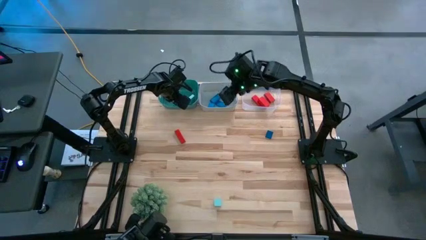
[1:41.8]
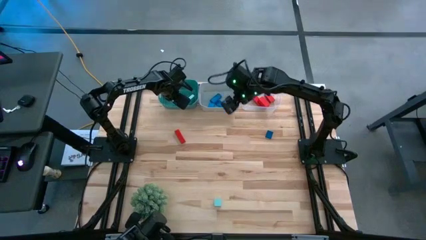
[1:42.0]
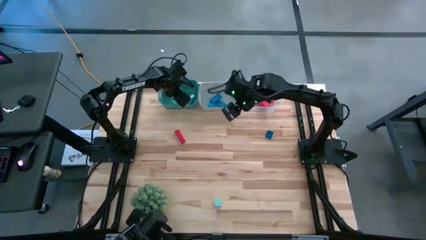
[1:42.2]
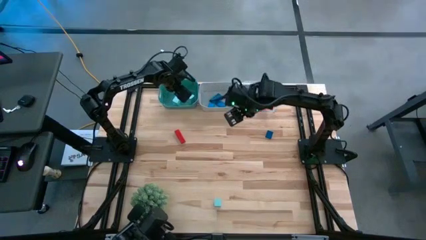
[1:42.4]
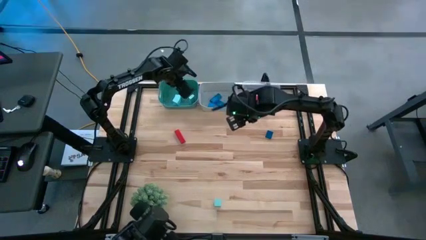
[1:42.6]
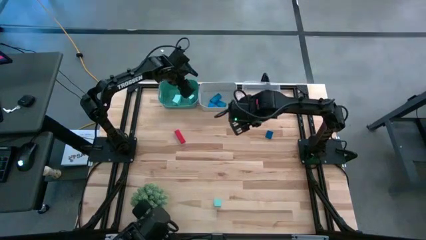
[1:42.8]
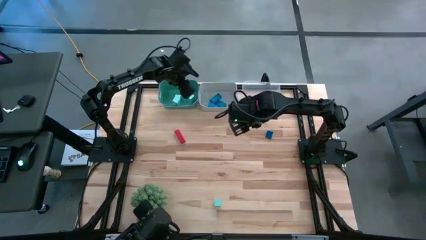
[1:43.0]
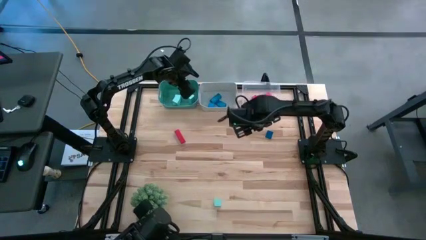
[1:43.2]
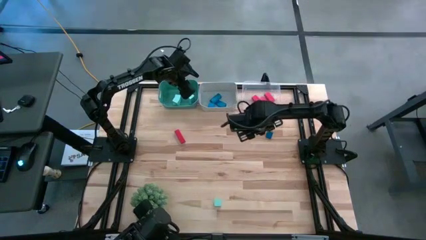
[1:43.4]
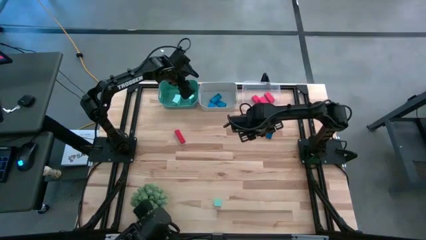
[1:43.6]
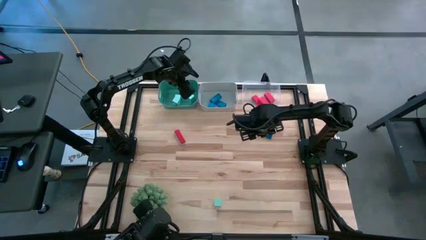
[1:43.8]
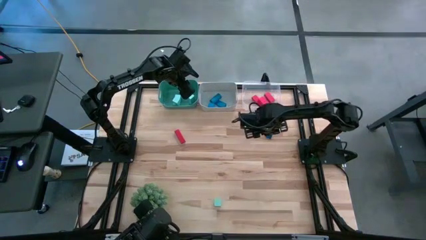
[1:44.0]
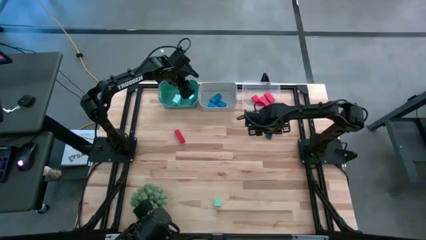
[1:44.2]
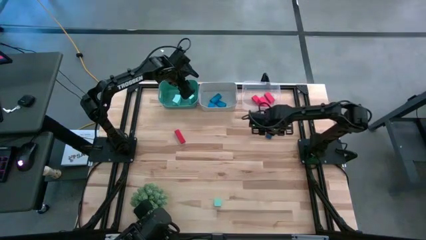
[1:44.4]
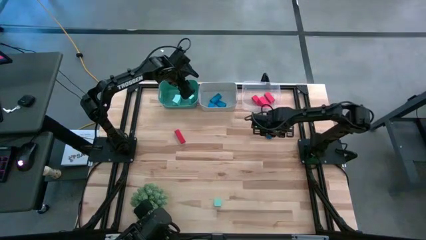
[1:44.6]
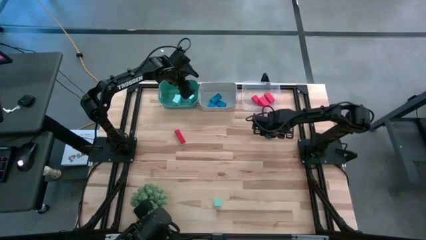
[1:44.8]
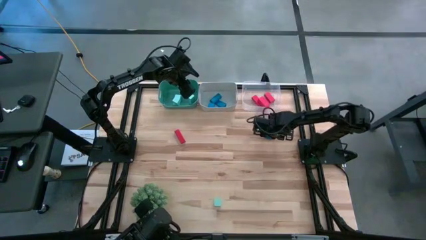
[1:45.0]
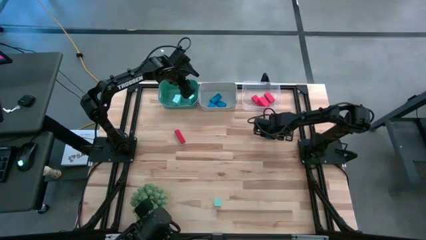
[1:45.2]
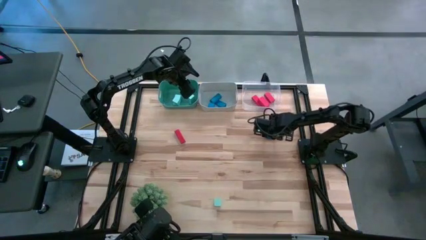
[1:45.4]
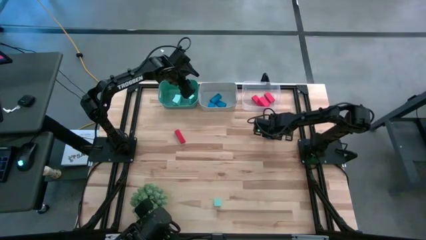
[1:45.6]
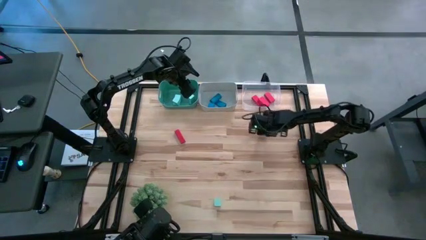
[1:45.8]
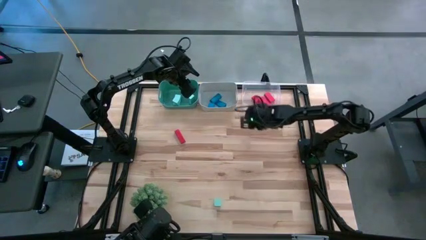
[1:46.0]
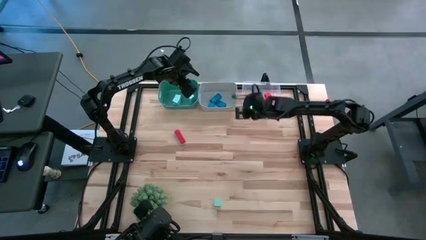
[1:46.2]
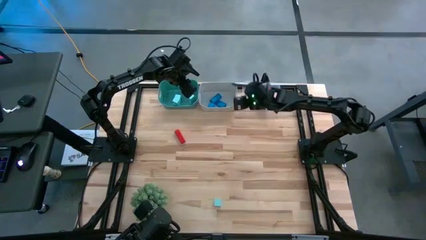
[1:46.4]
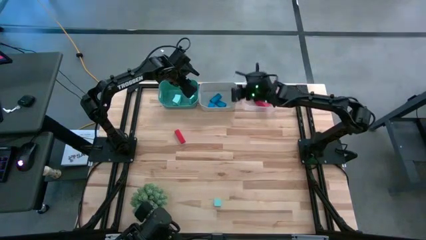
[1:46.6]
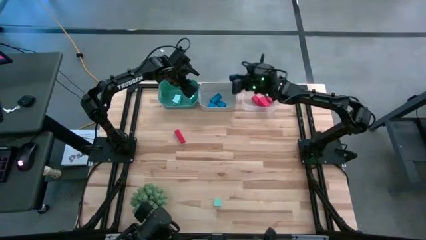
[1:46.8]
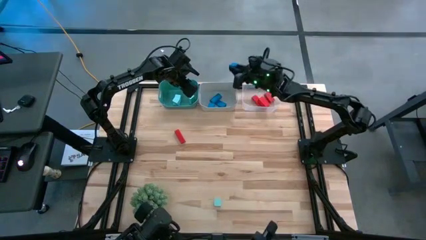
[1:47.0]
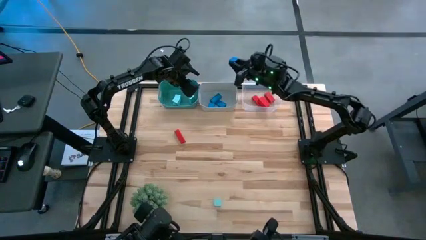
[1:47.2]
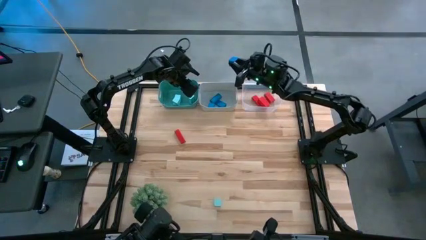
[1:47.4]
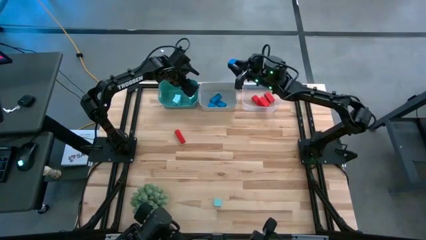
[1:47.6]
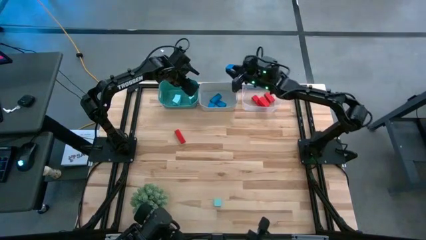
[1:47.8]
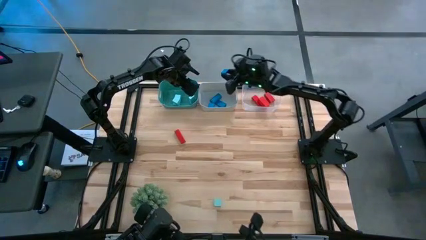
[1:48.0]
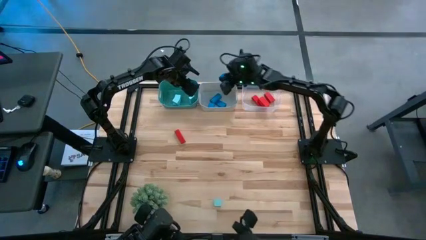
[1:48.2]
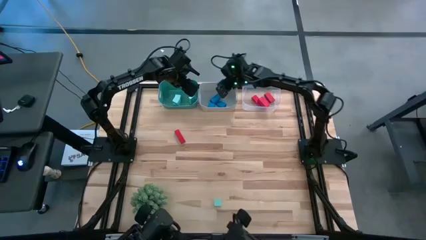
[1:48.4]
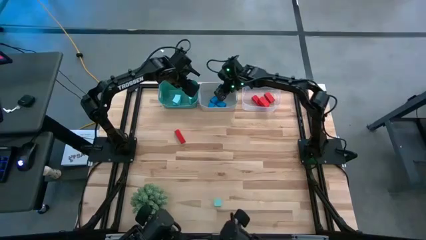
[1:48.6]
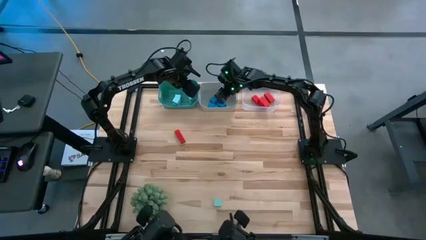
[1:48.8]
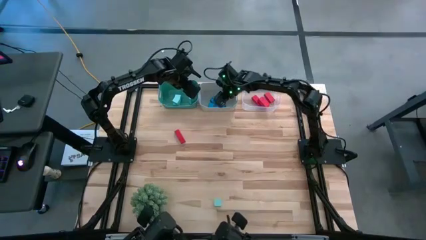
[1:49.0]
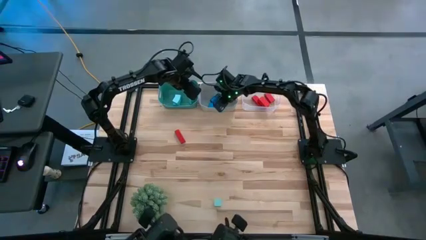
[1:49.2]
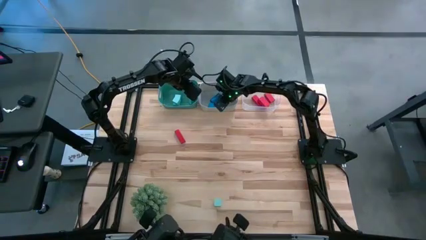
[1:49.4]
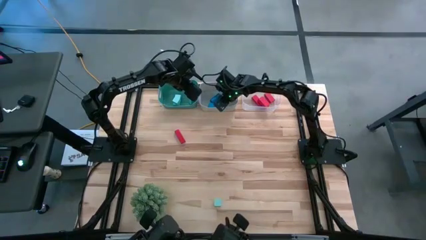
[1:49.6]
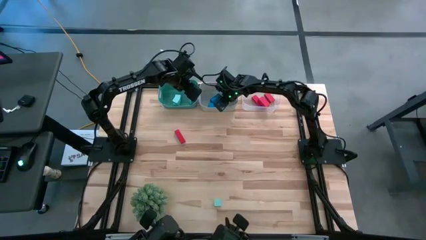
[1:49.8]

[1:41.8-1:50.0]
Task: Sort & place blocks by color
Put the blue block into the gray bin

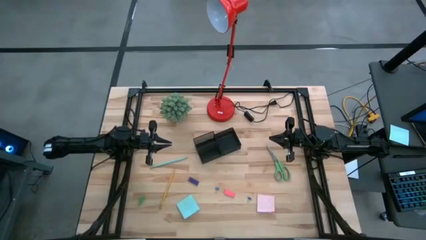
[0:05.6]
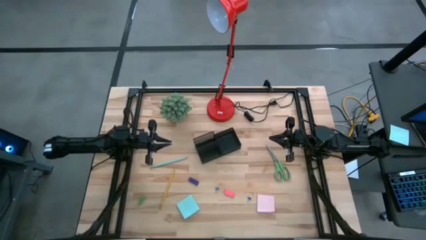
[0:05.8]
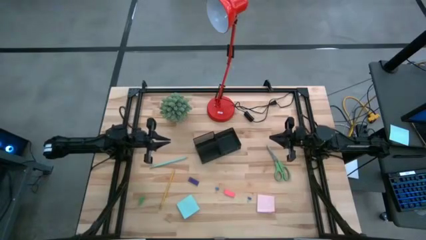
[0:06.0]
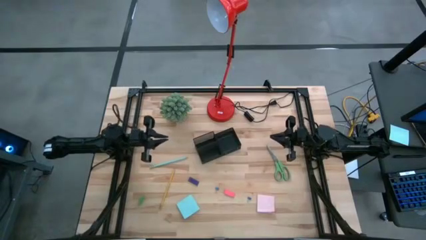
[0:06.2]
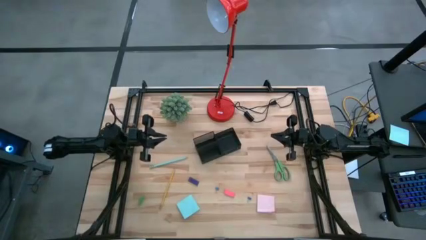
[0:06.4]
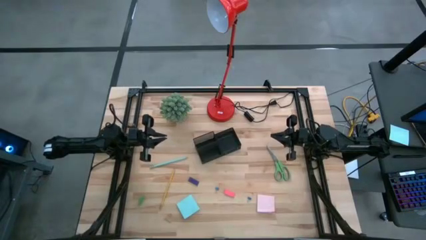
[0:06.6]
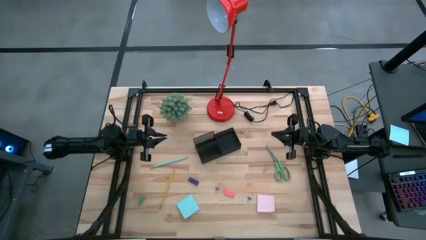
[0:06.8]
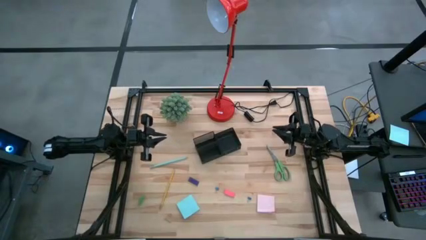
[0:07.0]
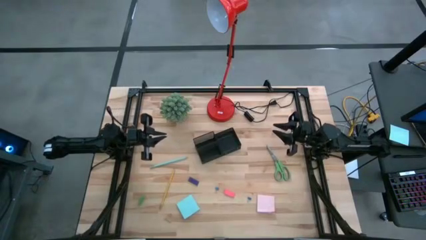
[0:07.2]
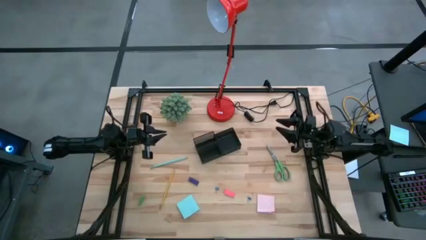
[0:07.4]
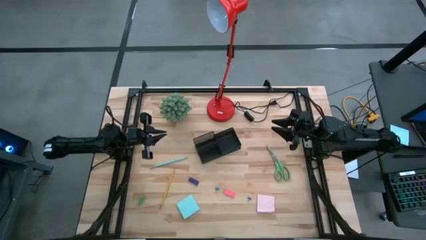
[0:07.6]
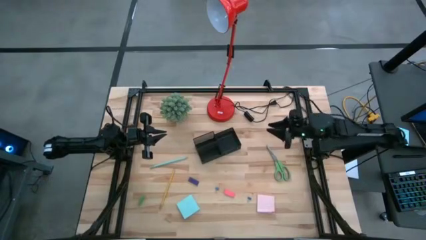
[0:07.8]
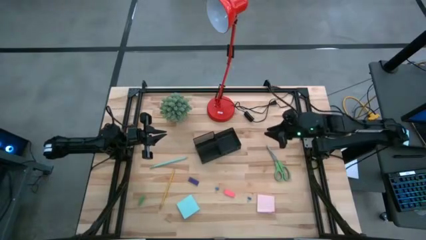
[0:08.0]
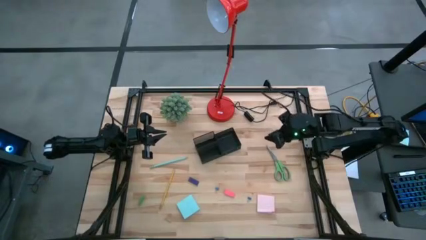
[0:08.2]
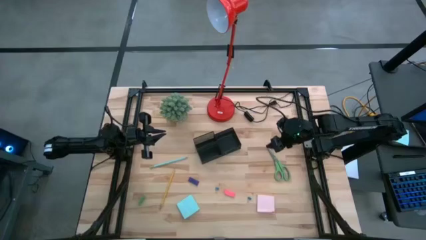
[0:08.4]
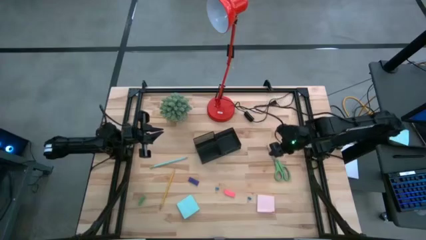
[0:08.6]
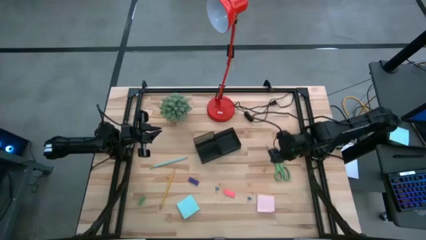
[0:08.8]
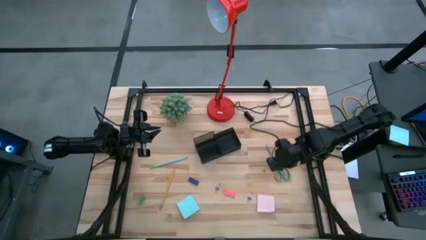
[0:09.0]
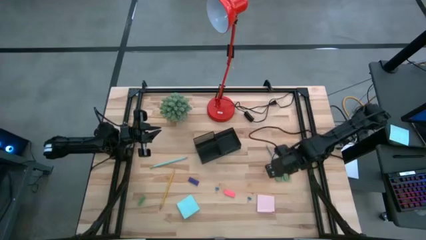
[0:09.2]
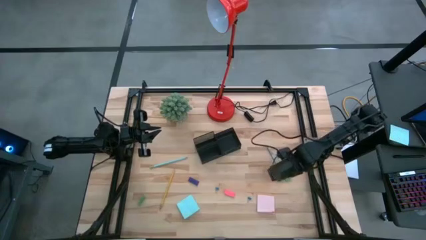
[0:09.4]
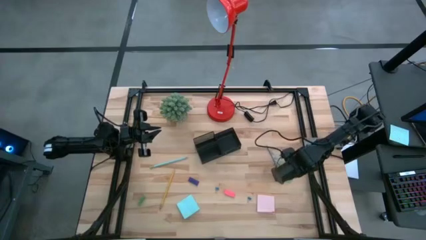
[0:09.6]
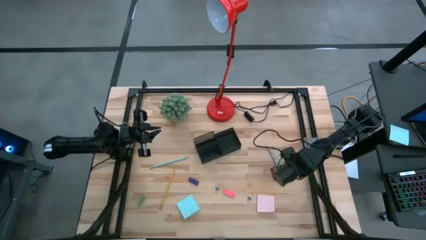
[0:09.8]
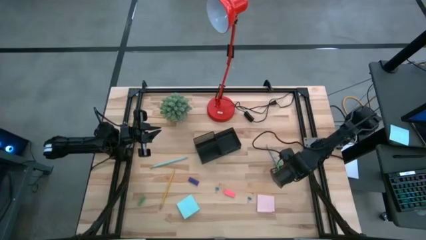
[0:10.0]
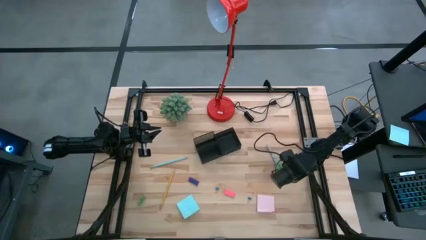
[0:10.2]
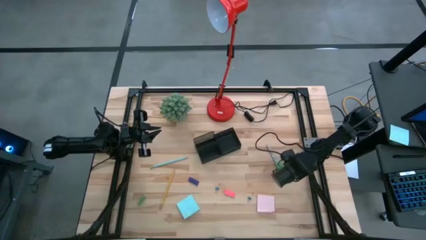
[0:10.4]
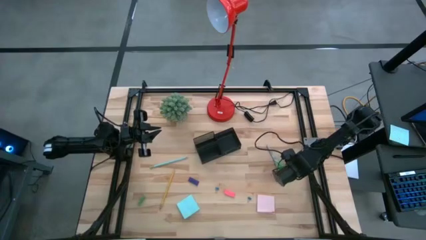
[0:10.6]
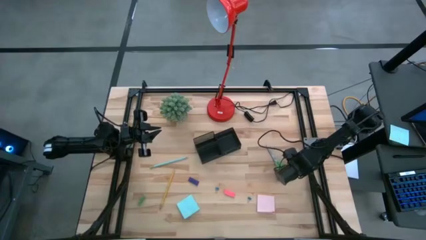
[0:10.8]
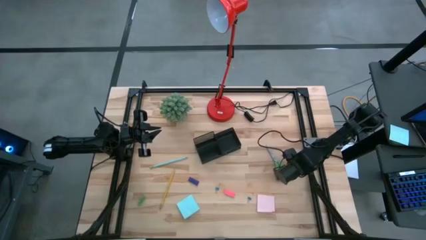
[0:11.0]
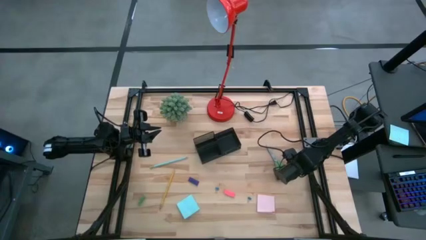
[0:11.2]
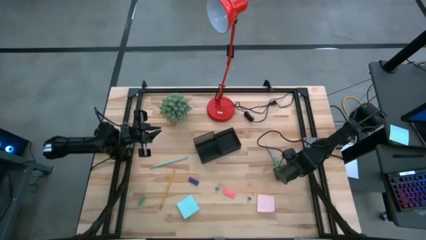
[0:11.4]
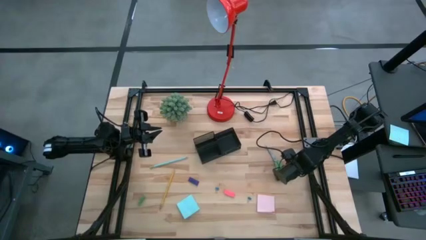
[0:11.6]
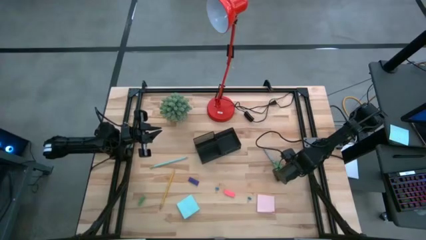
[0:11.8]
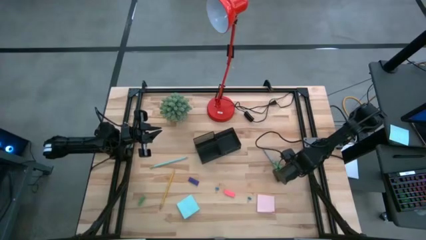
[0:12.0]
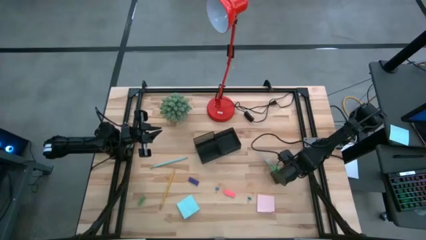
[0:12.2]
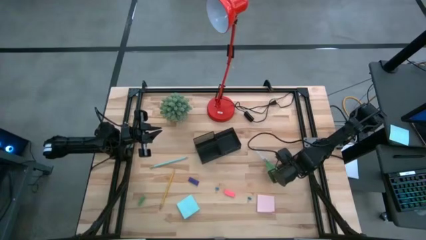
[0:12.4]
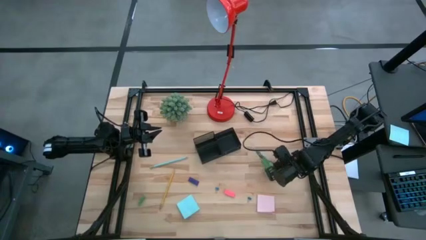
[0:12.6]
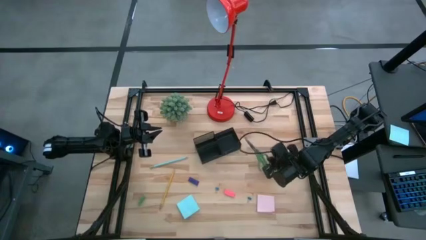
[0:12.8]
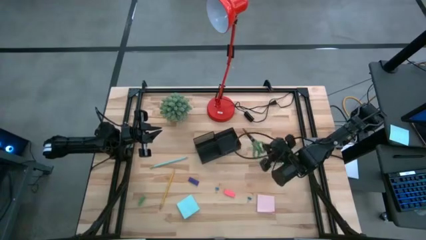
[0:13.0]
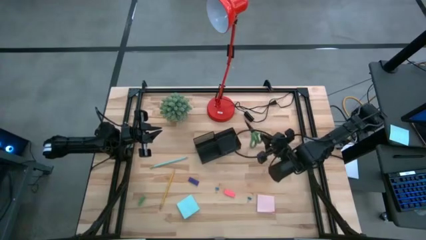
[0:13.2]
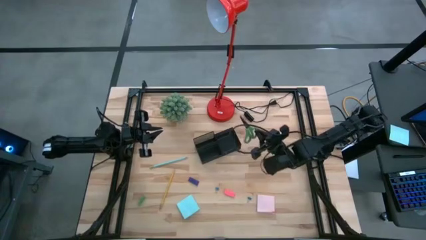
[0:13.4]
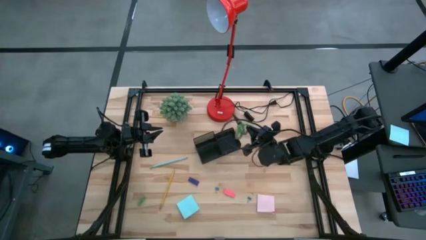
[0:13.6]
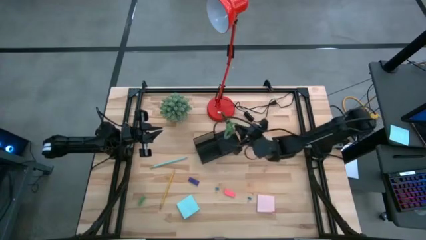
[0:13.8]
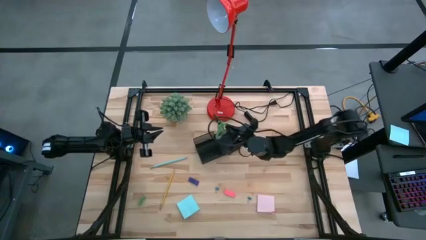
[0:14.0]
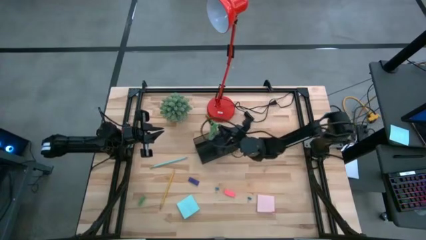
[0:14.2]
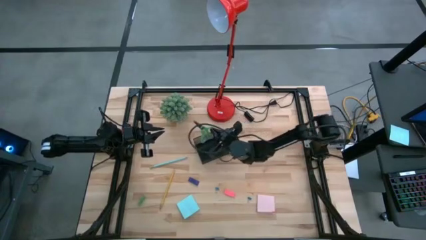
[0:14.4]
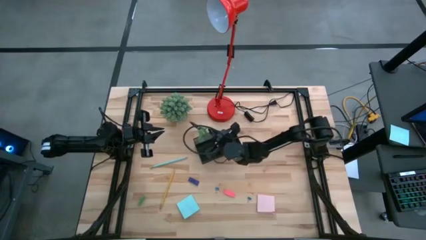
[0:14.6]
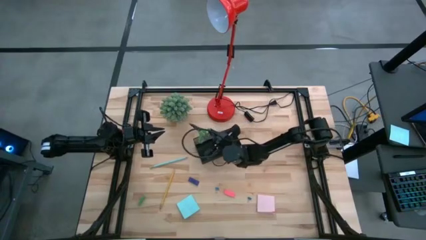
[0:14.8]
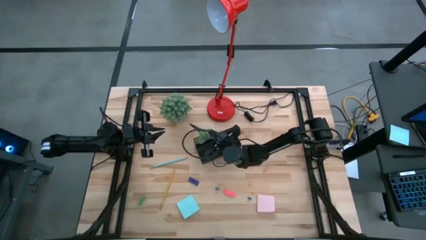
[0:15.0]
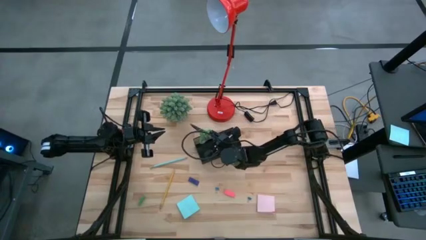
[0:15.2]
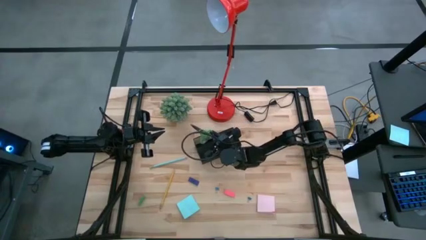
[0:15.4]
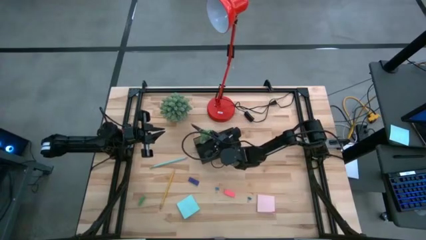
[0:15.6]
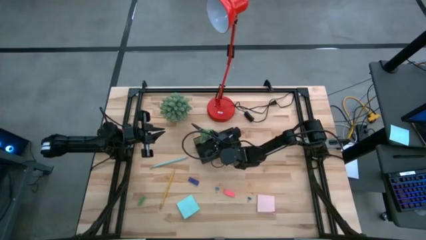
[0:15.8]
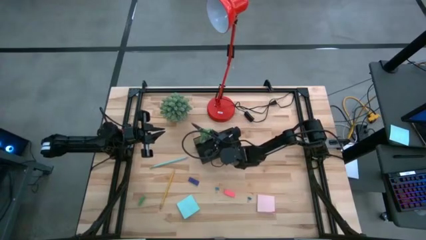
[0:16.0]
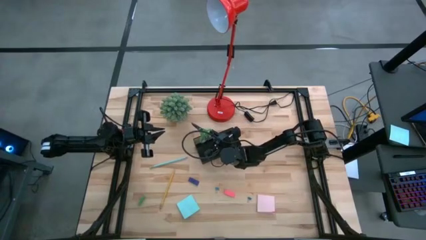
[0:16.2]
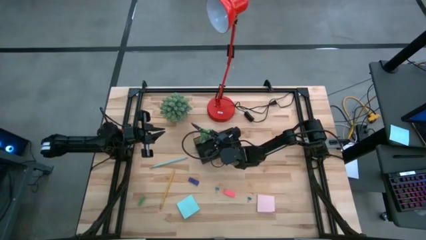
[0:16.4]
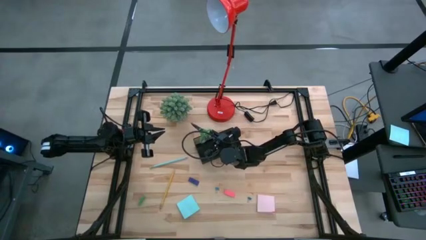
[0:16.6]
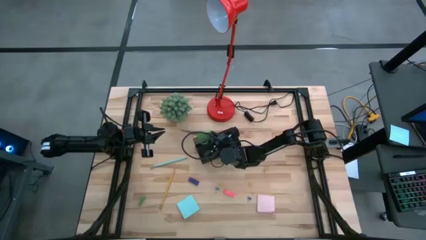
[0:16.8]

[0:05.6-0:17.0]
Task: Pick and place office supplies into organizer
Put the green scissors into the black desk organizer
